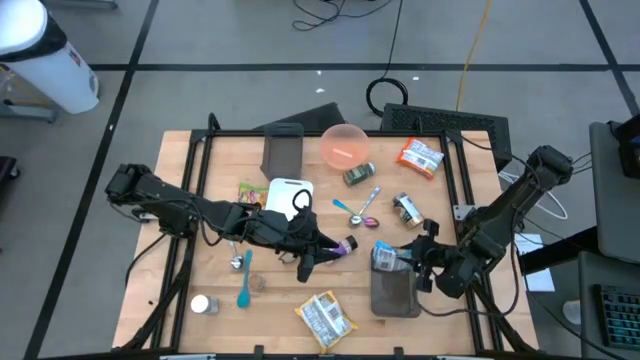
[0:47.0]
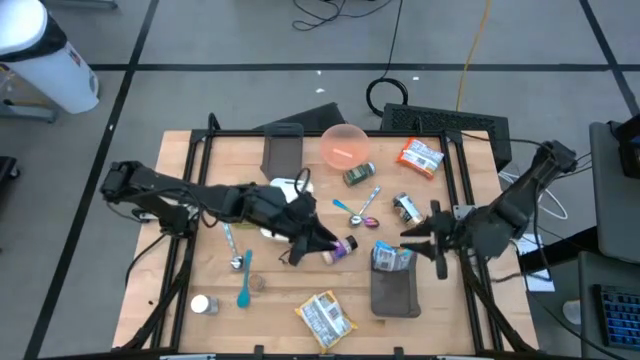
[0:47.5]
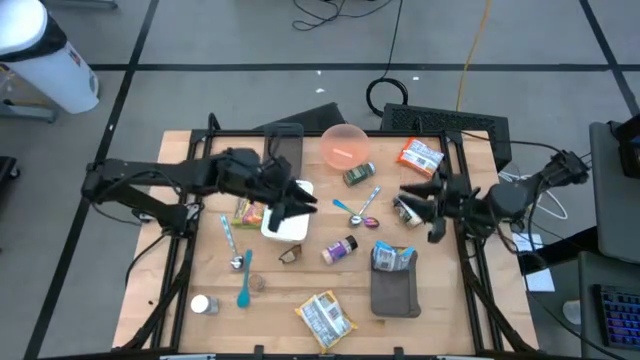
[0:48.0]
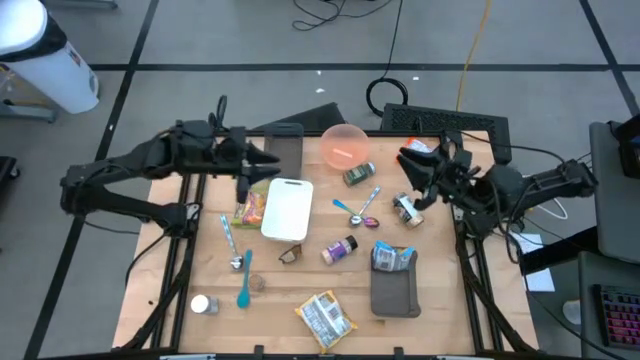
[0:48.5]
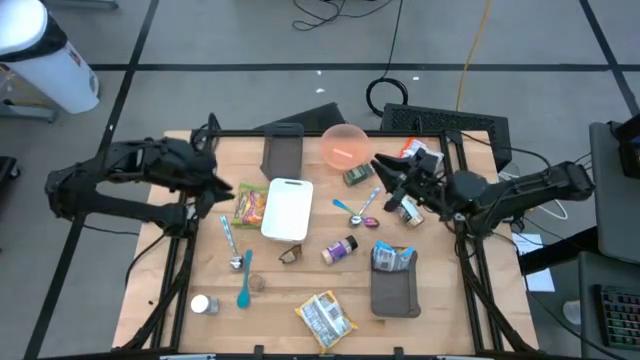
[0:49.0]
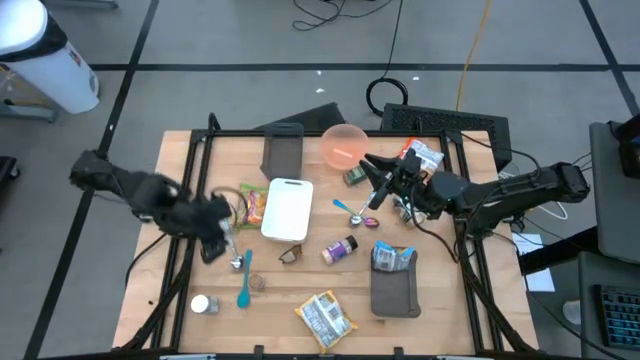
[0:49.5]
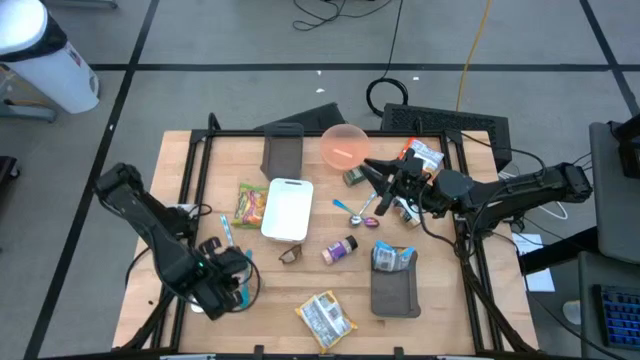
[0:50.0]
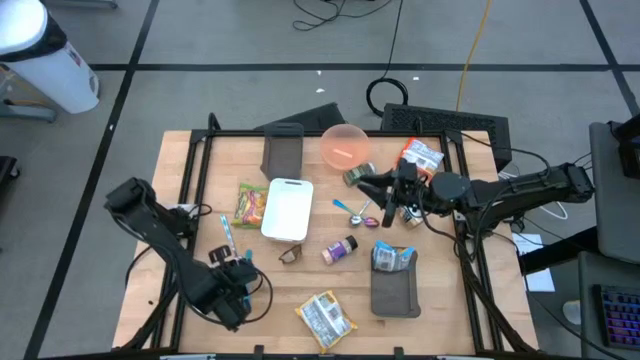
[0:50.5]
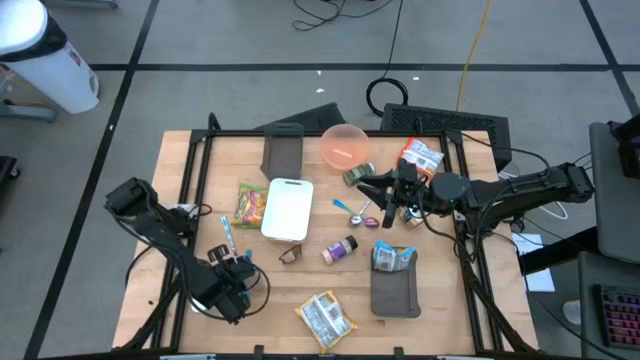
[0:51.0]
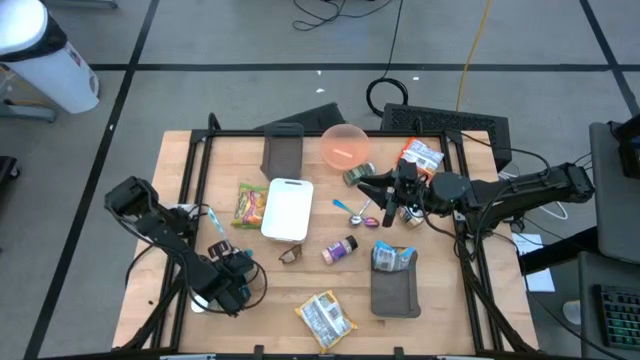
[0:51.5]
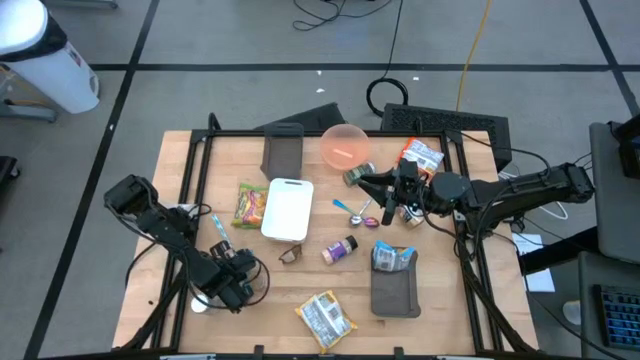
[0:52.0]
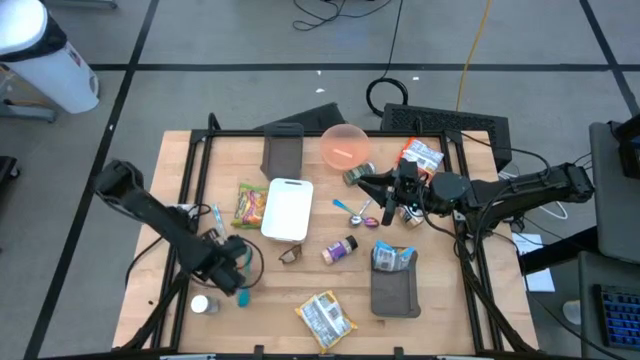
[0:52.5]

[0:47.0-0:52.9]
Task: Pick & Place Food Item
Put the left blue pattern spoon into the top black transparent bin

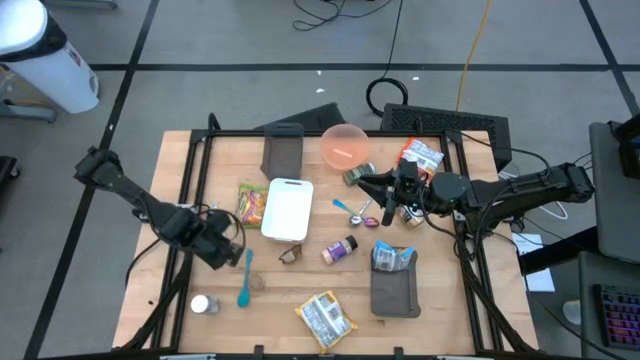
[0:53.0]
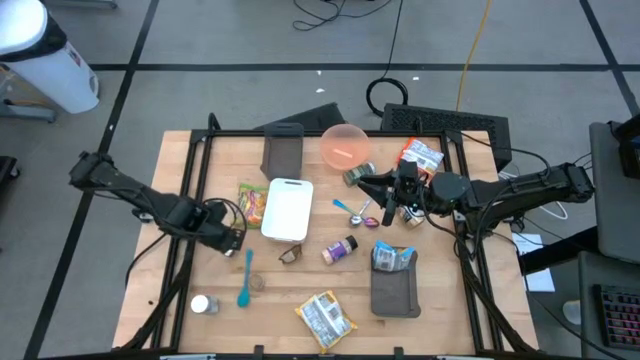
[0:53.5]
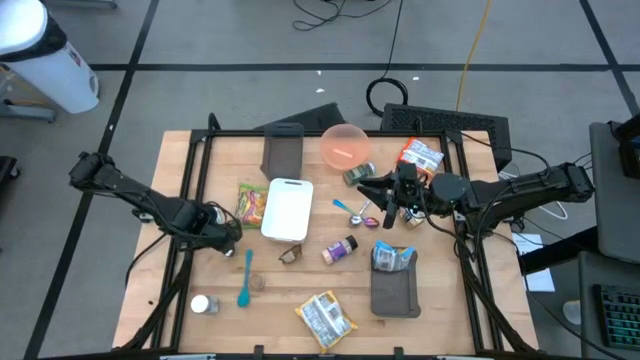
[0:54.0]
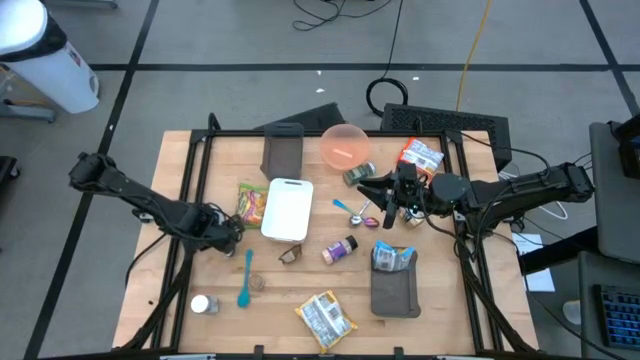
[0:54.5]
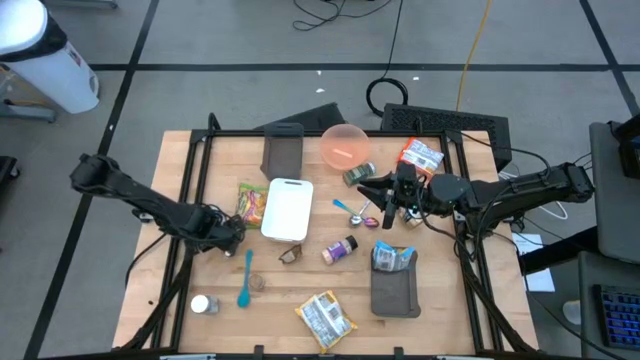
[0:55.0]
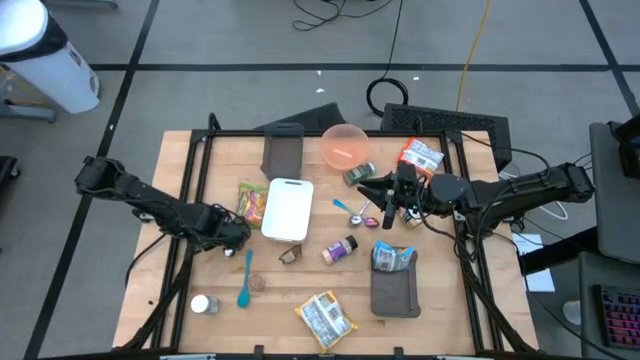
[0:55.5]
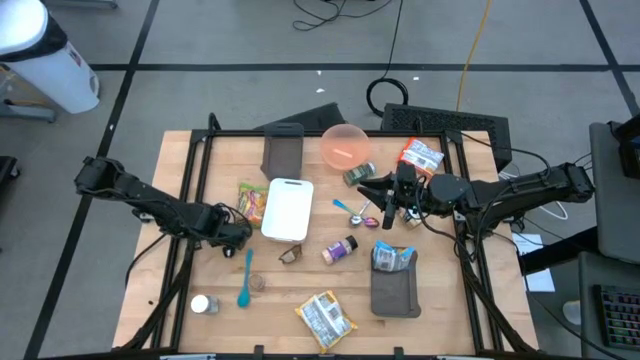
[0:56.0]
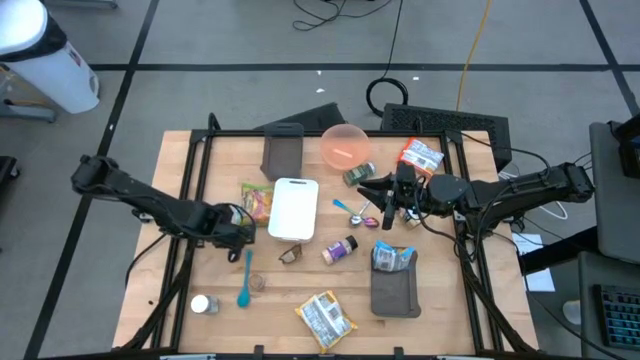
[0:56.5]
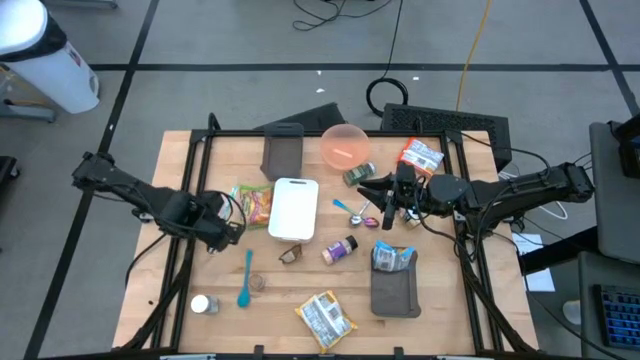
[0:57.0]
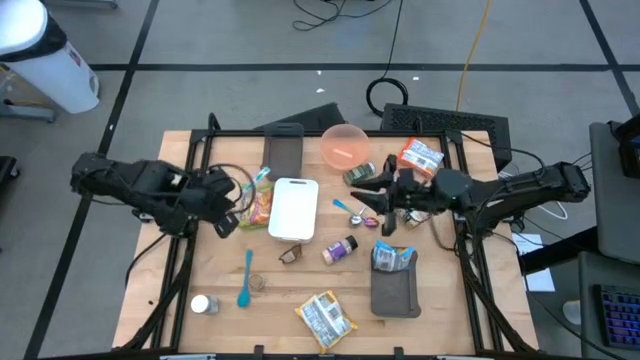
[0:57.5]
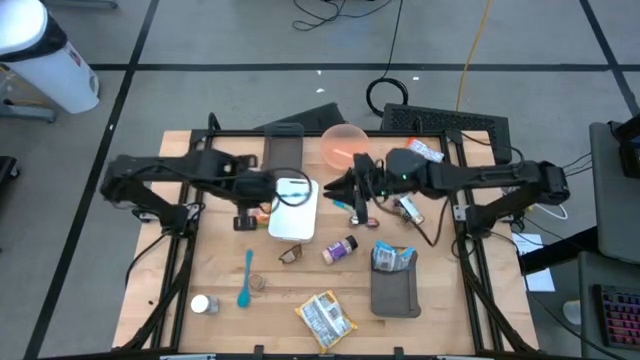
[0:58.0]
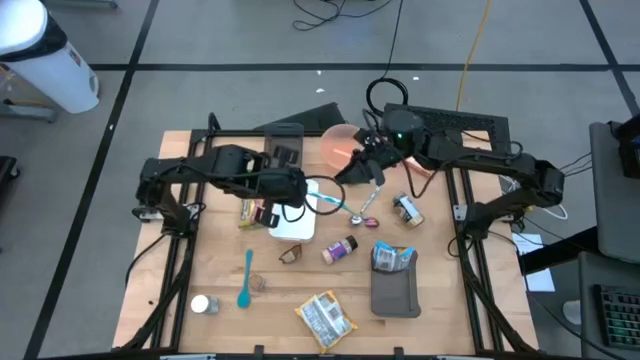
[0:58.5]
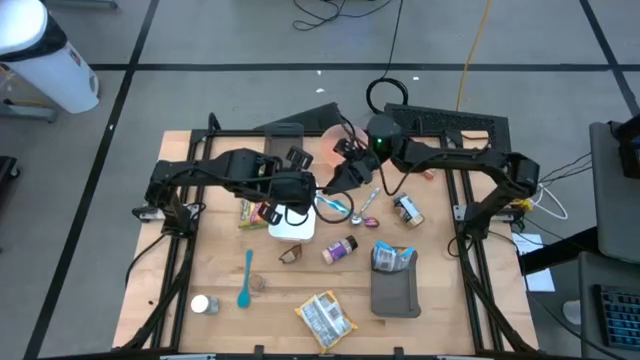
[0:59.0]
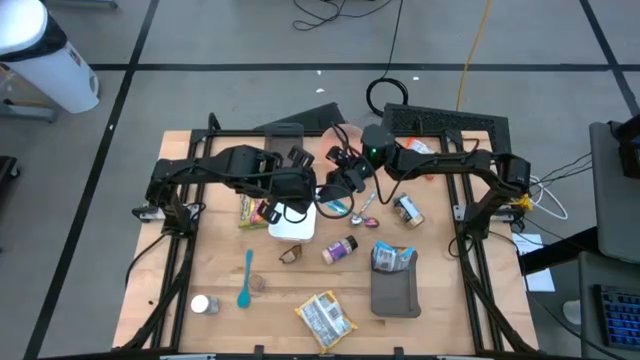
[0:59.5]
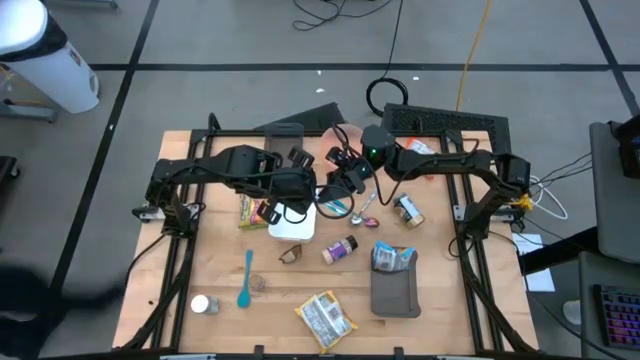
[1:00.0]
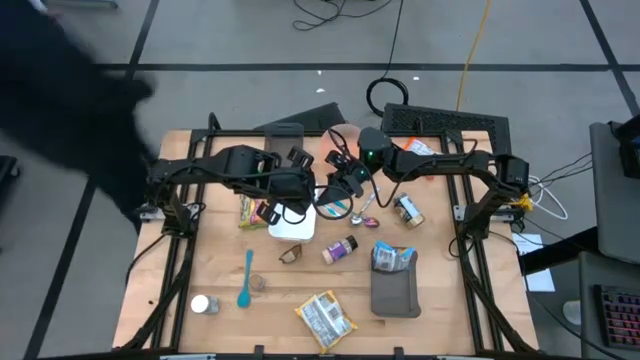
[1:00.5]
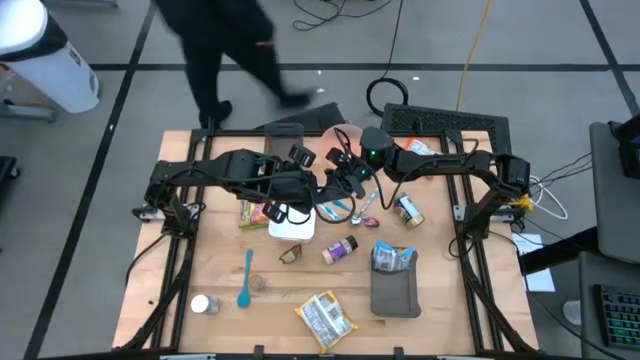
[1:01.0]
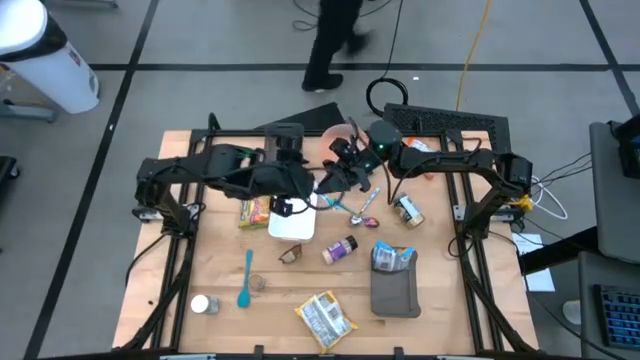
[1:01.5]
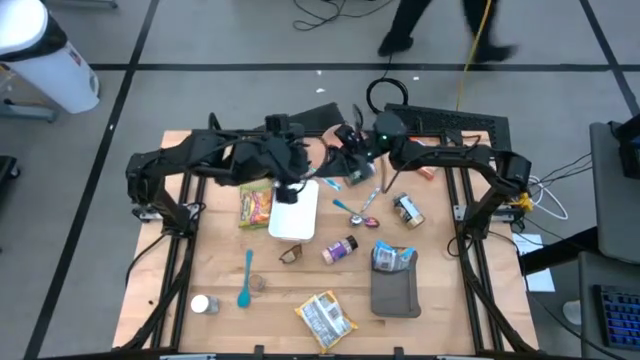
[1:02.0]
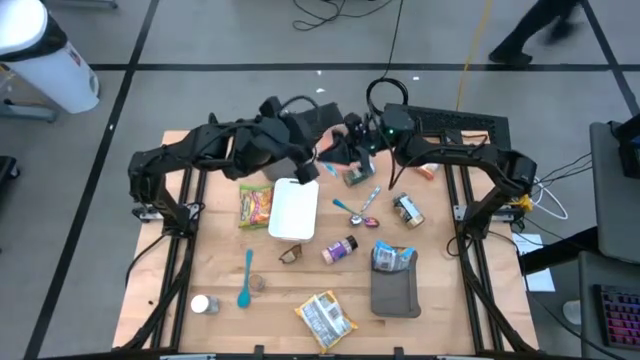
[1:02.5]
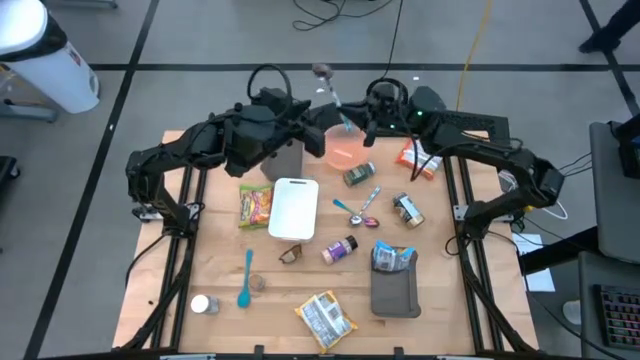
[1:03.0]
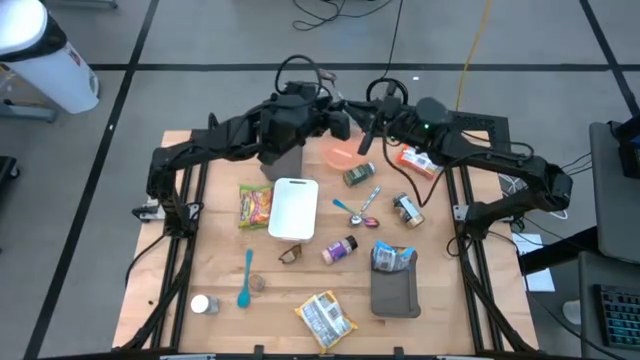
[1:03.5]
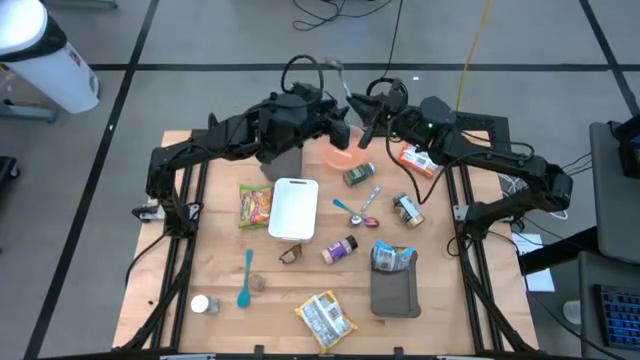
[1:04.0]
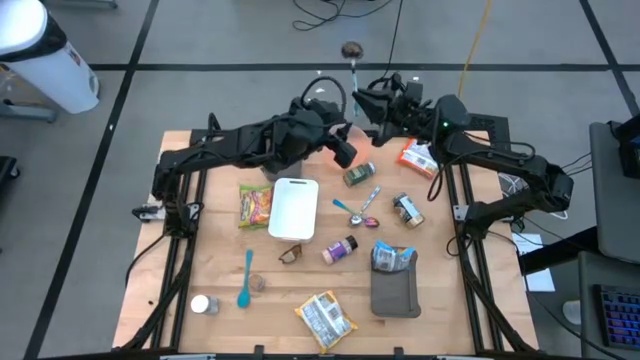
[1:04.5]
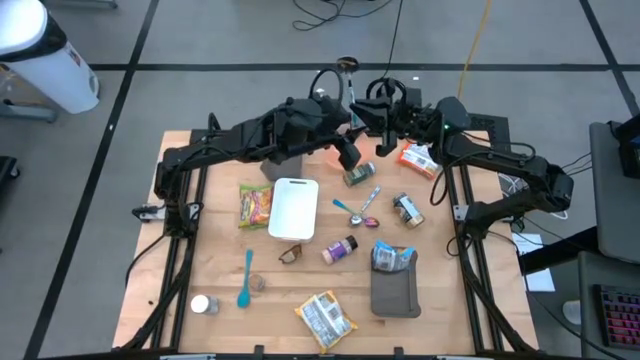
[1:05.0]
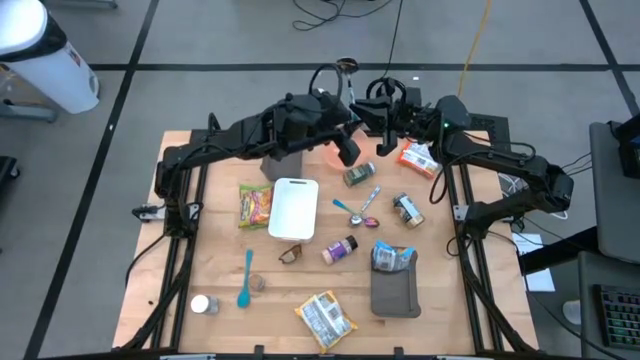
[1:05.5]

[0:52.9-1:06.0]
Put the left blue pattern spoon into the top black transparent bin

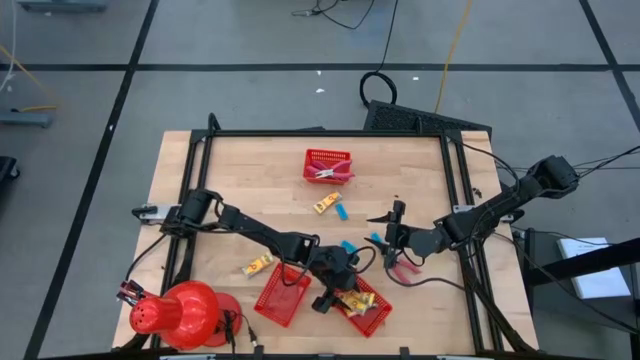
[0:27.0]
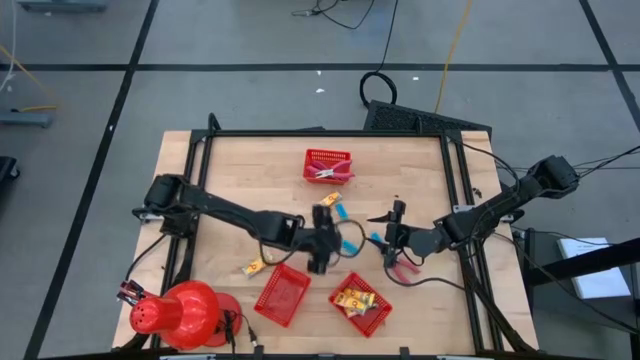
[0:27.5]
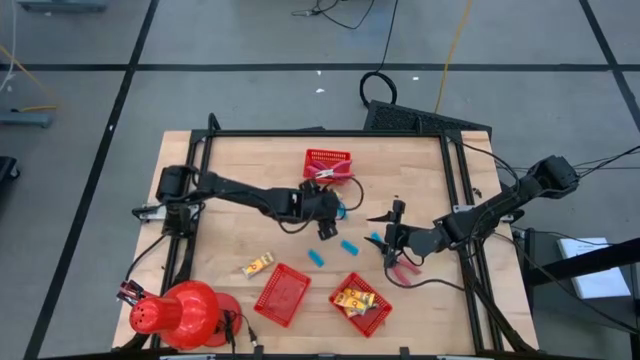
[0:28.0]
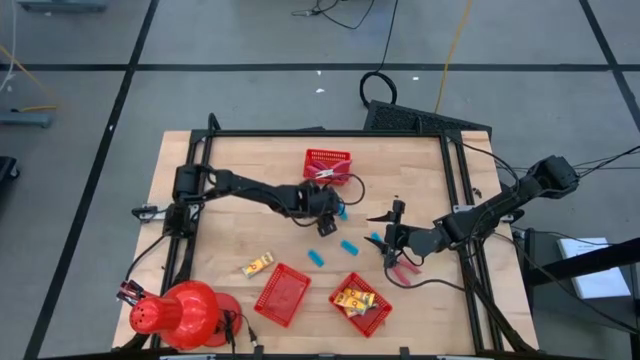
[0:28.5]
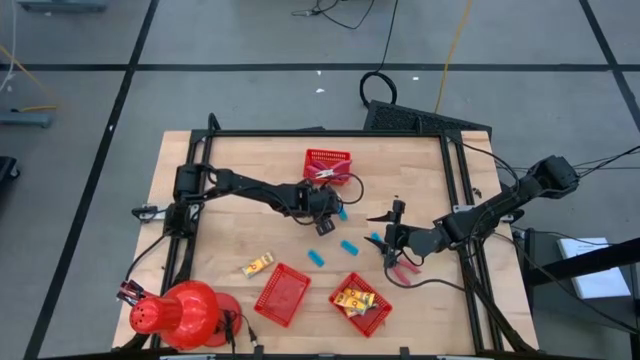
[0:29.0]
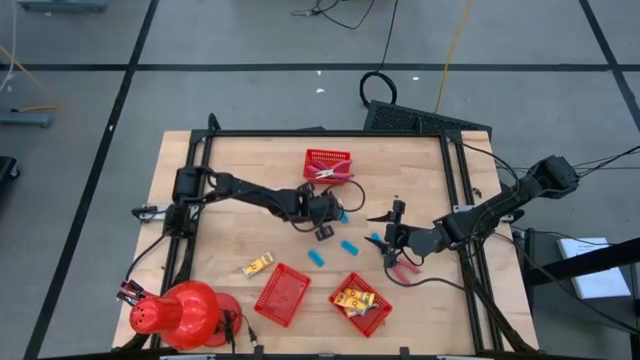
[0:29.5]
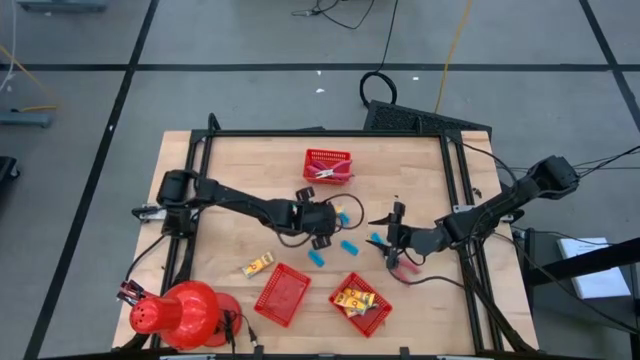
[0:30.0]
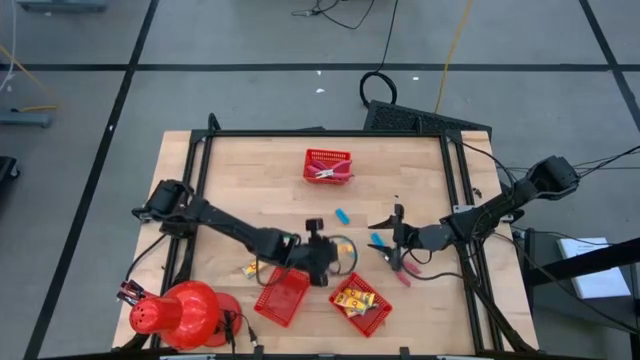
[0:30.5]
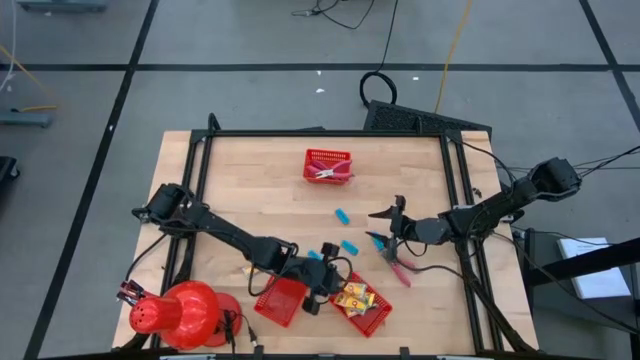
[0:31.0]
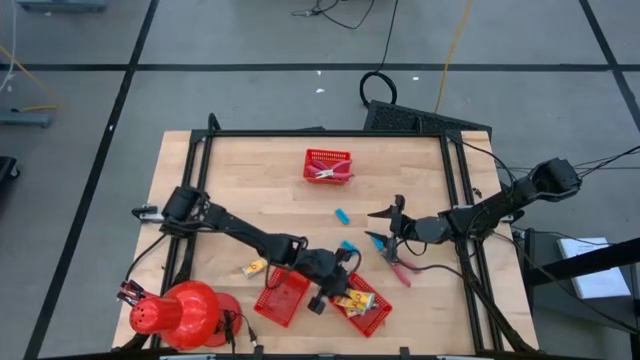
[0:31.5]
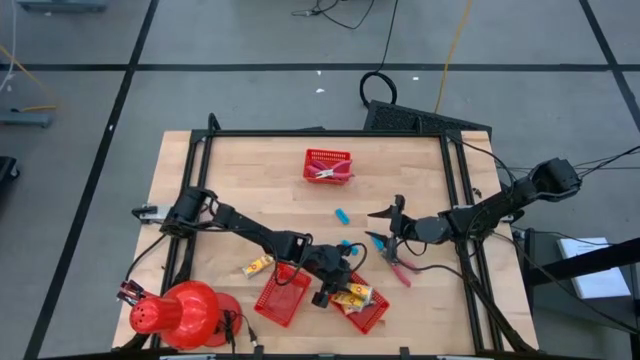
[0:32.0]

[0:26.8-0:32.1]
Task: Pick & Place School Supplies
Put the yellow crayon pack into the bottom right red basket
